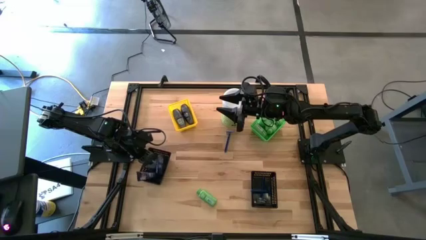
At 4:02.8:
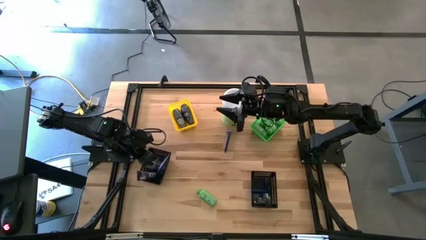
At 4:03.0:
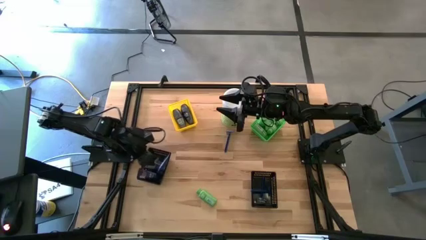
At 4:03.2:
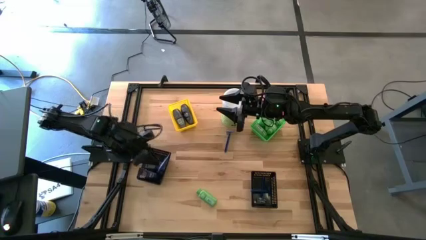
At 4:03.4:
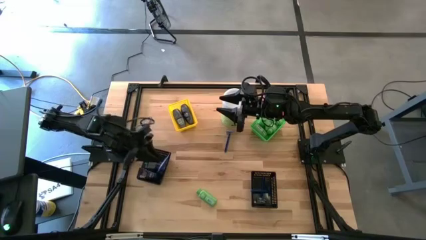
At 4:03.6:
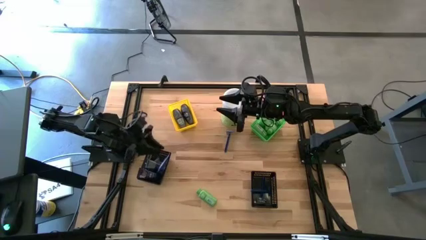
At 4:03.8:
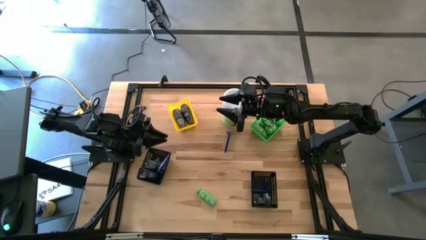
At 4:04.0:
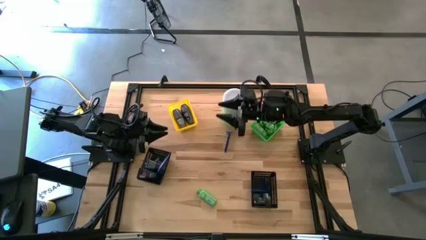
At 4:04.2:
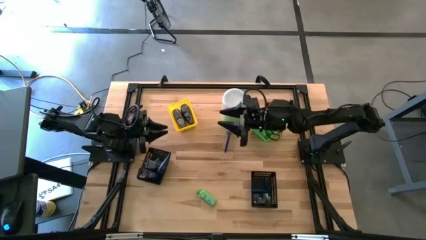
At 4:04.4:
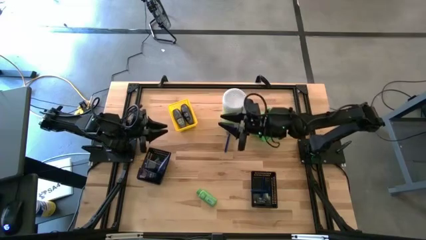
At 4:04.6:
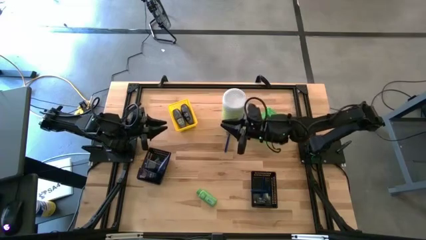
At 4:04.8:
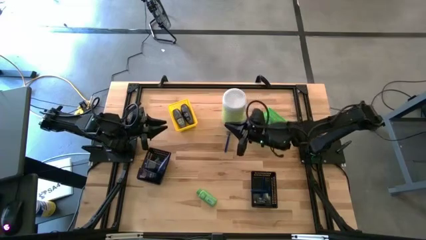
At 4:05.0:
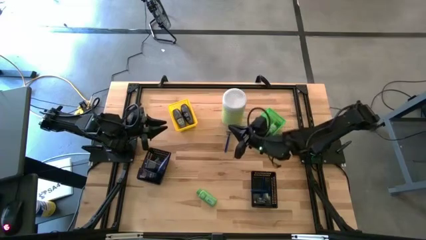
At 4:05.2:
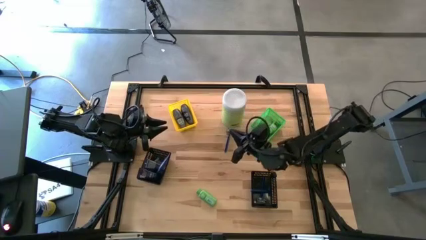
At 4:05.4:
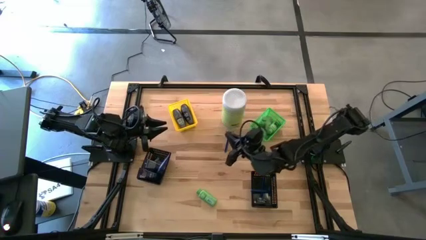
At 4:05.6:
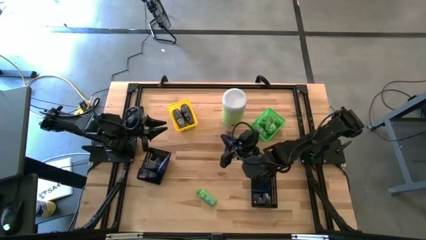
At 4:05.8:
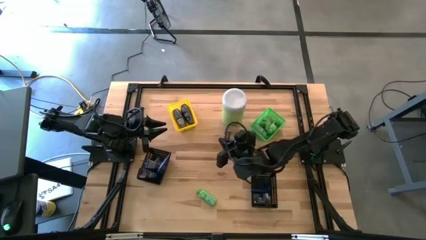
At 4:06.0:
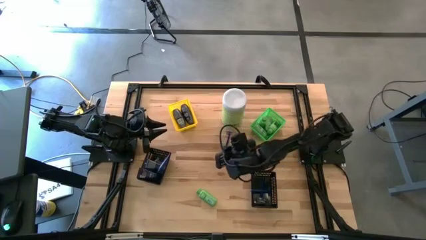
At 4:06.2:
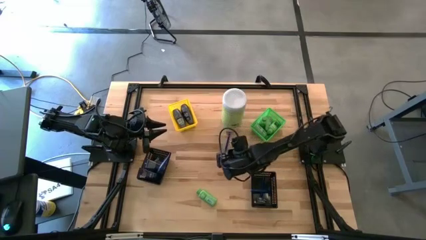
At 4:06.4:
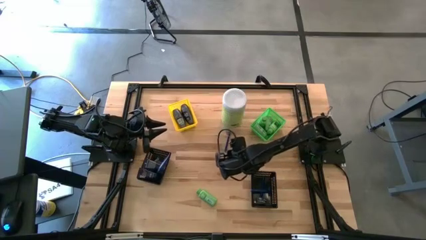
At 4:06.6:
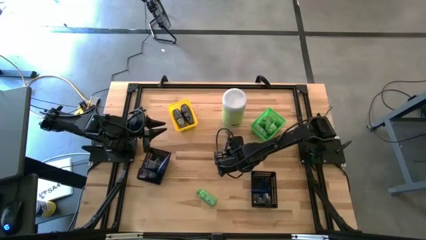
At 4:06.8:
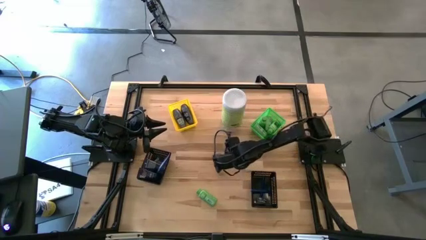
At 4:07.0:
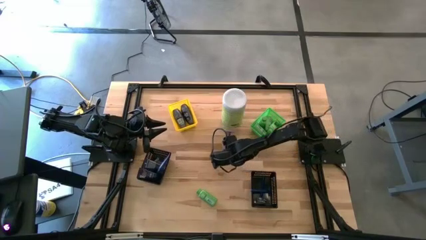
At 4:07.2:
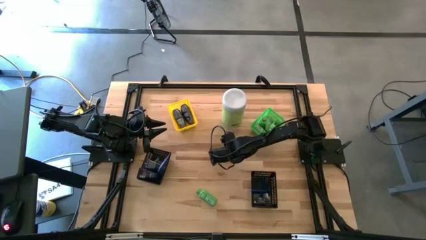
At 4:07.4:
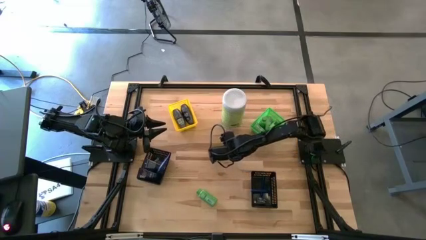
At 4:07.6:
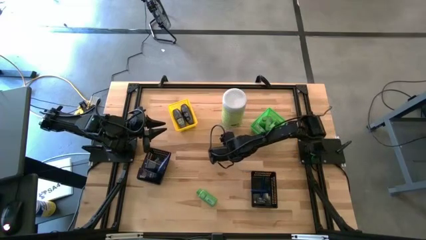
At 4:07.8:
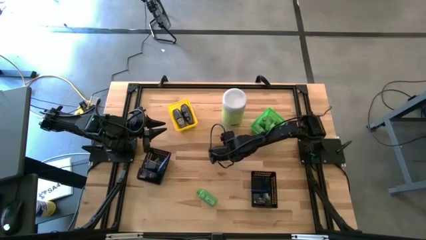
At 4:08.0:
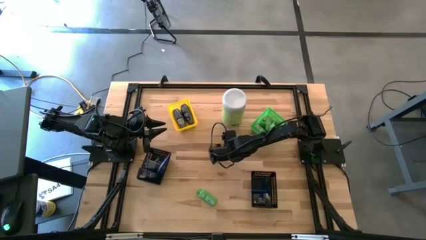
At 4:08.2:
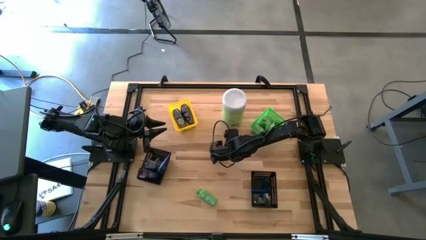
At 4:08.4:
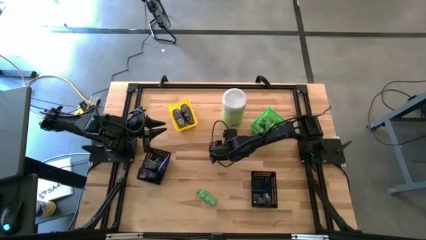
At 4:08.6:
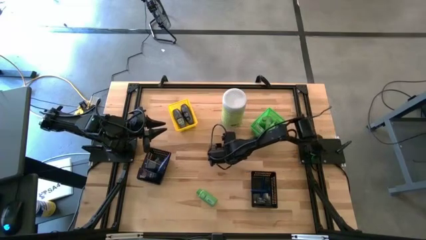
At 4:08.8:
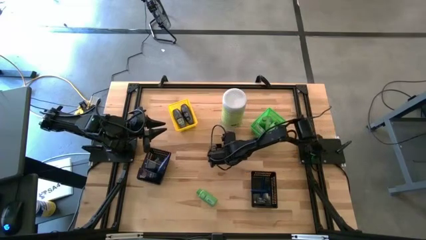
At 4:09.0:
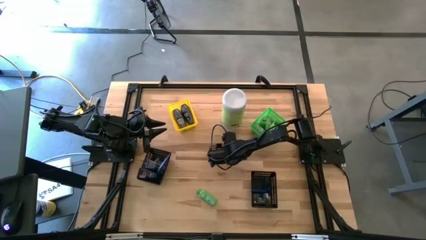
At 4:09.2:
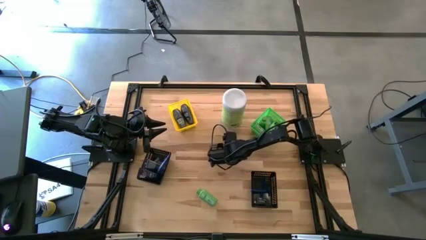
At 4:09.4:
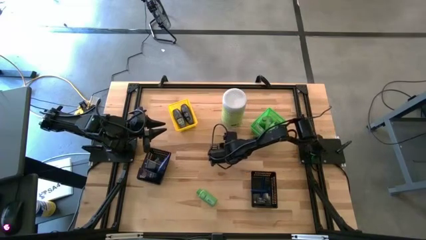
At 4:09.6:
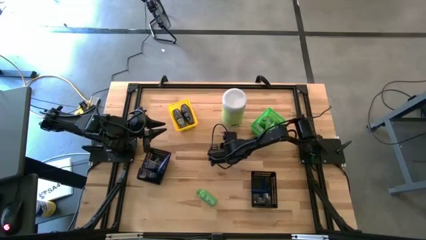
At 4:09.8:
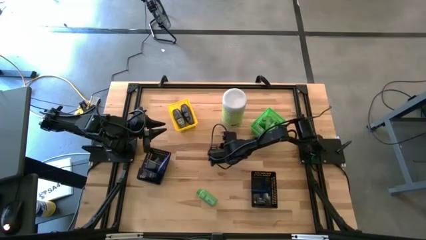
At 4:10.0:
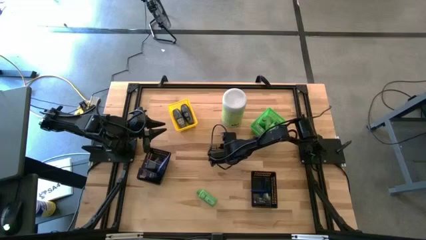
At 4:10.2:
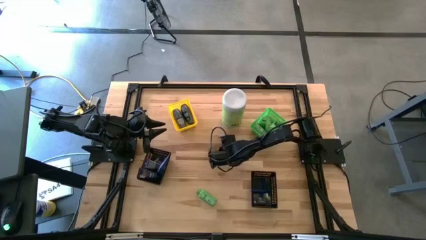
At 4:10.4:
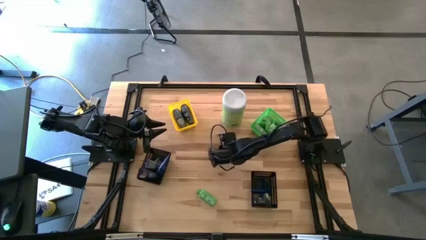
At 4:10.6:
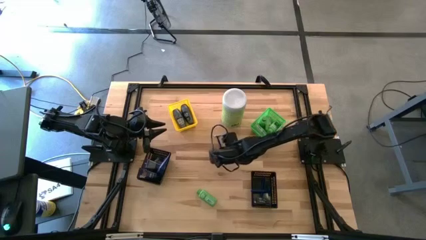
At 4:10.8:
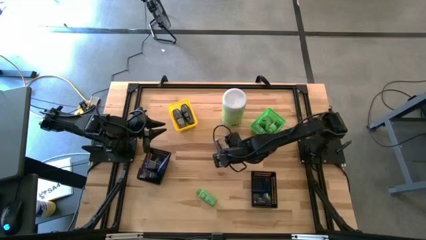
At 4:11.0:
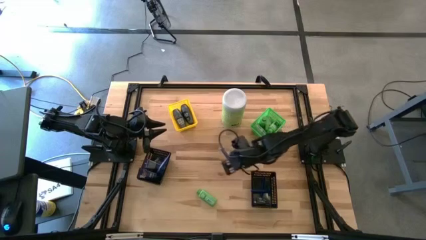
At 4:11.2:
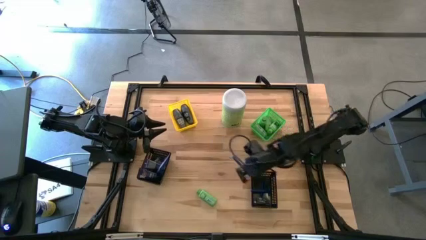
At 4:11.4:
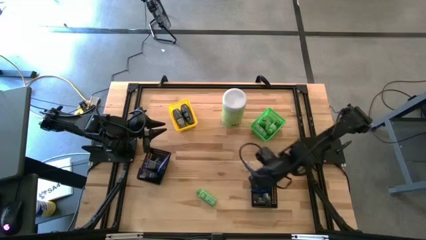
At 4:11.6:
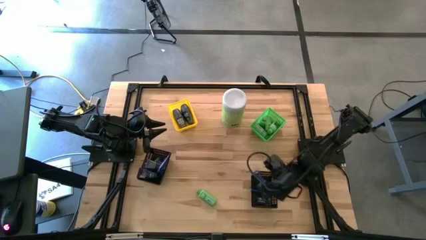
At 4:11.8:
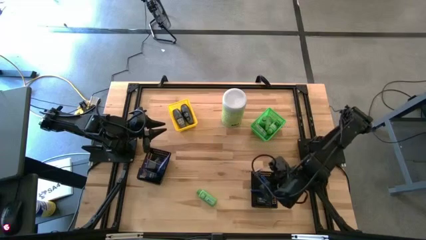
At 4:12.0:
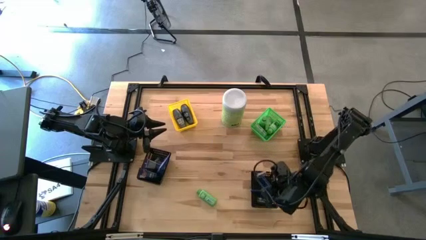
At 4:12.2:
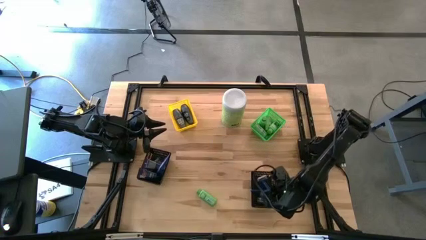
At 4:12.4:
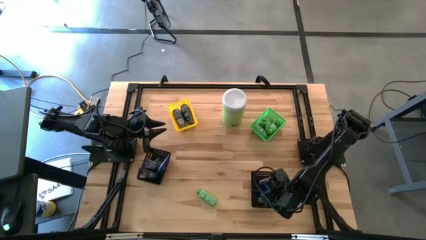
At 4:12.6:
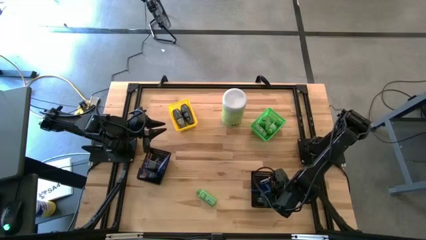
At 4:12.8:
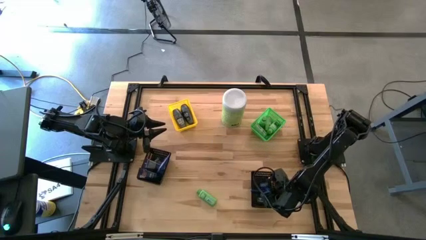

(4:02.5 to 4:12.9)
Task: Pick & Place Travel size toiletries
Put the blue razor into the right black bin

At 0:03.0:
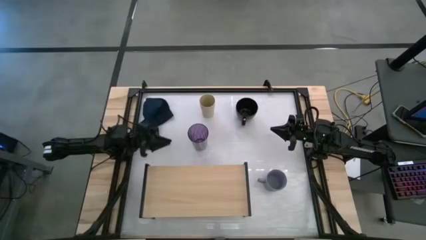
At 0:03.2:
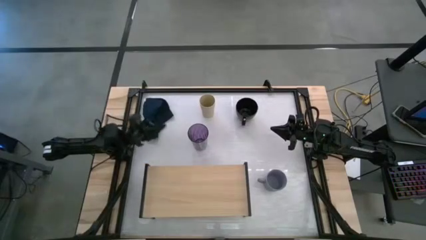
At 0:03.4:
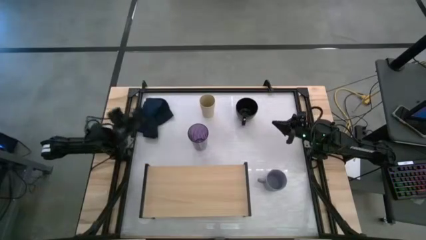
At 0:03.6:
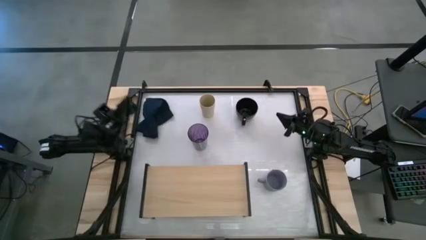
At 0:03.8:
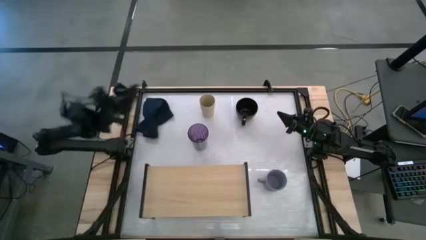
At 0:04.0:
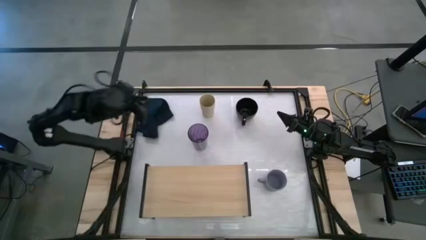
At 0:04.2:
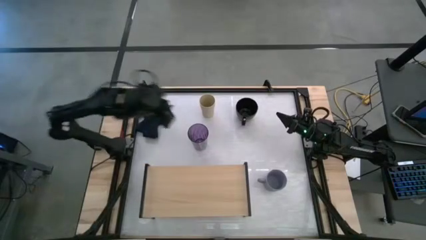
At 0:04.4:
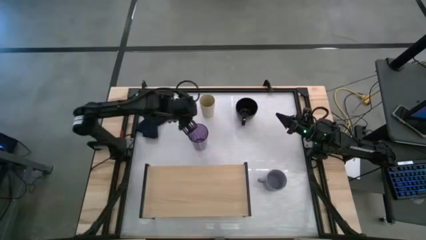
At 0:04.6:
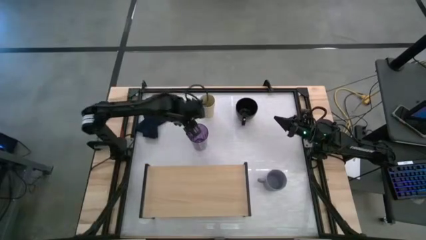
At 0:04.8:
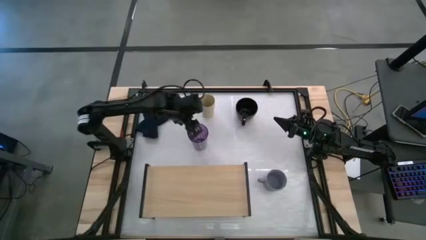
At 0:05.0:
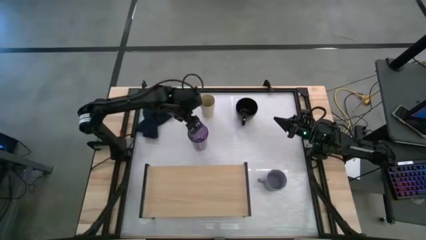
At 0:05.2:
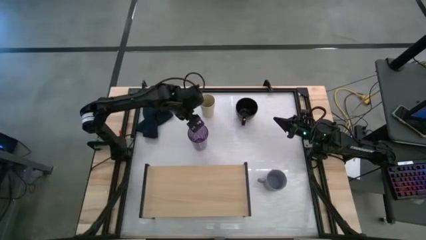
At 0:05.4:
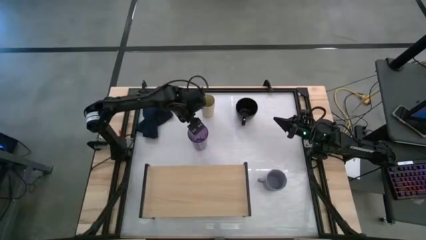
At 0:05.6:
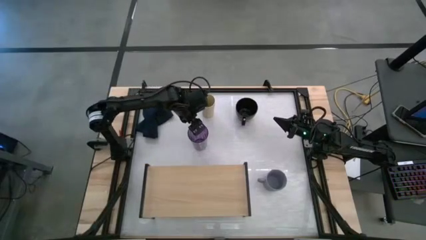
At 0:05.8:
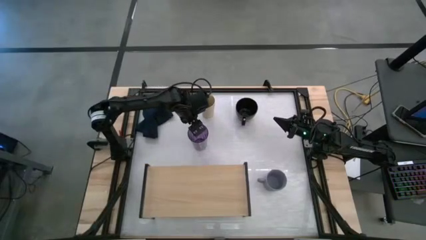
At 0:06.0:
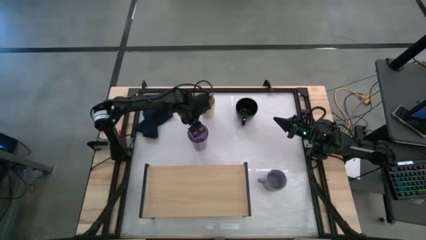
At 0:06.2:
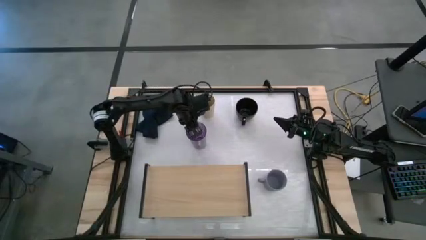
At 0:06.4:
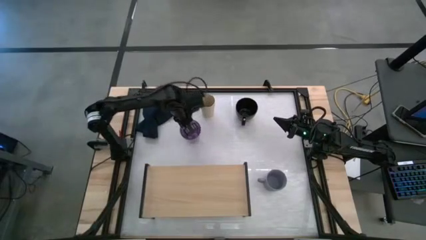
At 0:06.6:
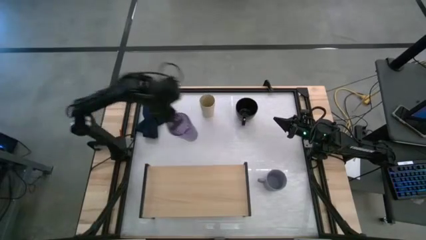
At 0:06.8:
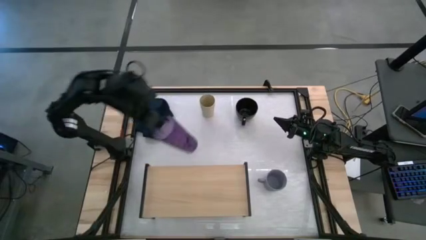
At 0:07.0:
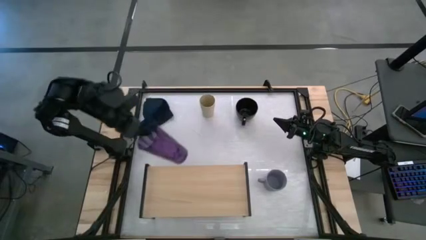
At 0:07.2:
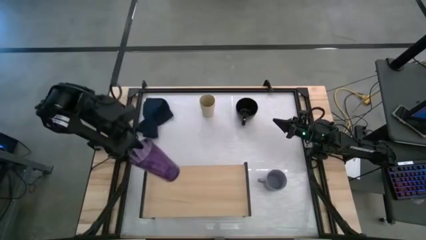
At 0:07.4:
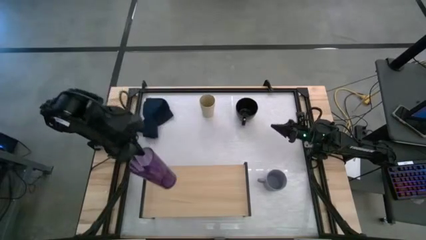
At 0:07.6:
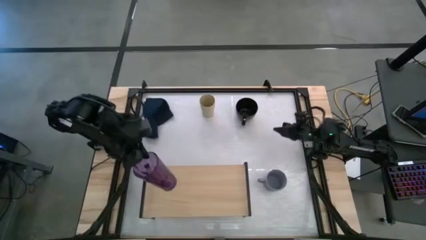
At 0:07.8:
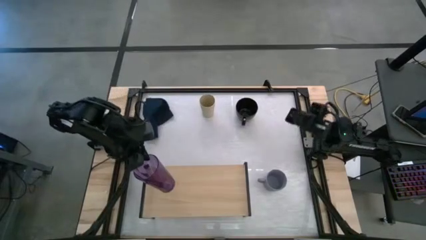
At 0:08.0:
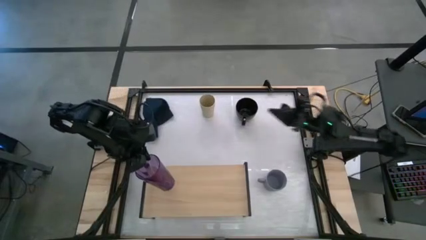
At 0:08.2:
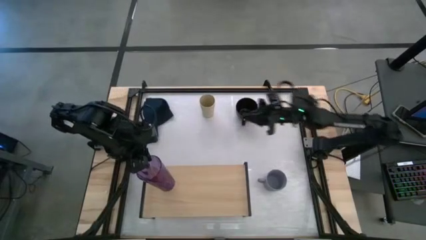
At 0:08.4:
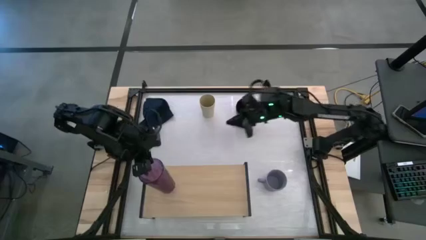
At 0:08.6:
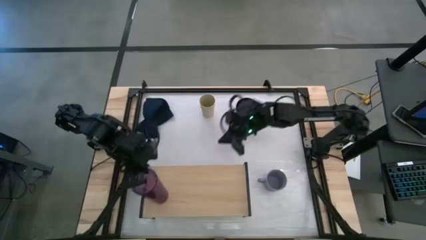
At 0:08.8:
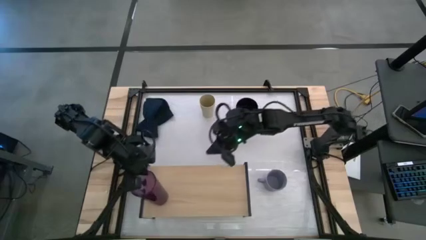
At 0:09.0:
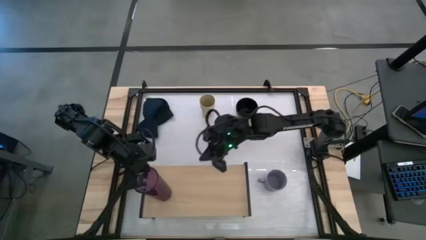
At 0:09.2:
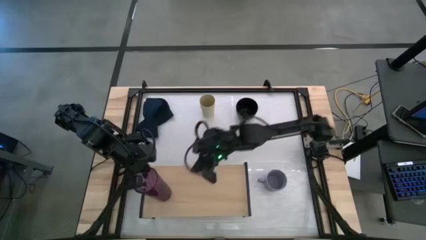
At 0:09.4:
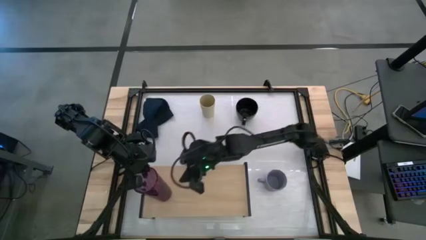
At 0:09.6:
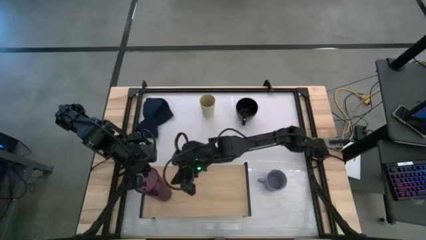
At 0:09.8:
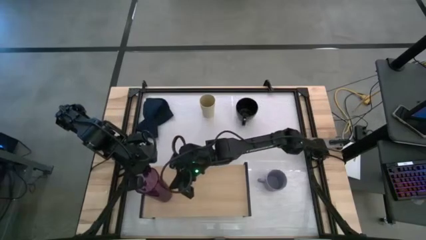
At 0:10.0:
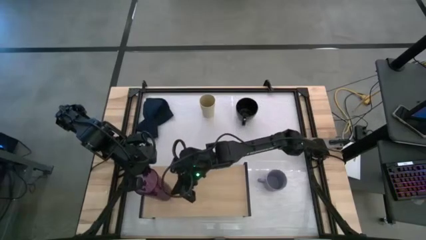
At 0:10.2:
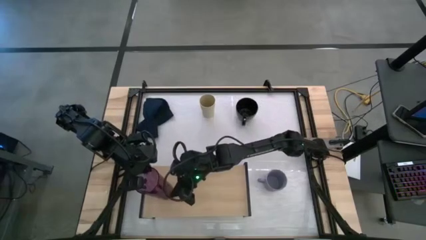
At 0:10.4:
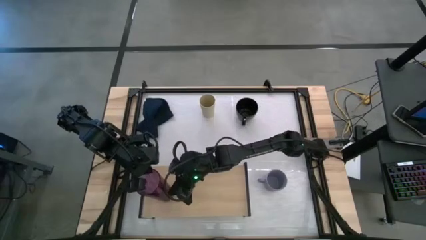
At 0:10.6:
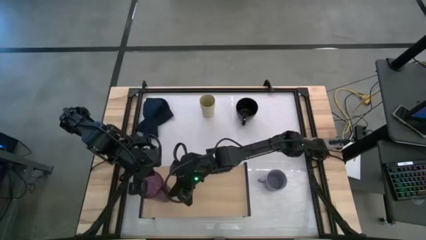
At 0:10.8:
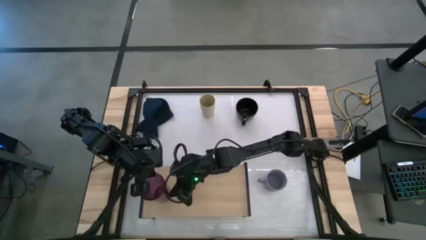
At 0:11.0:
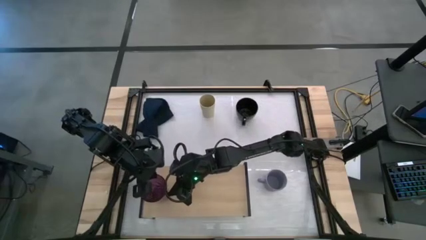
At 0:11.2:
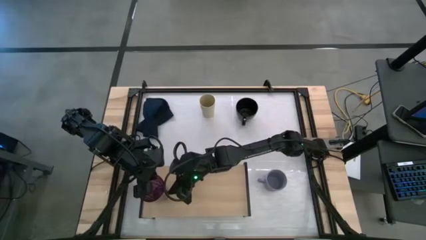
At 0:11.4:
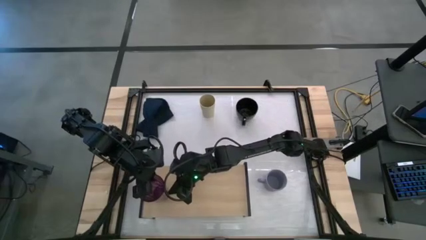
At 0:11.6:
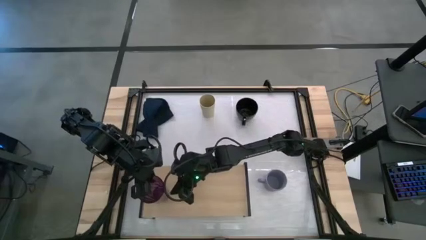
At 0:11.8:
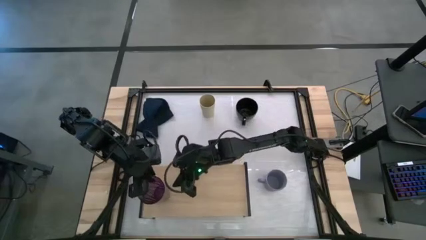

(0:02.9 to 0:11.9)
Task: Stack small to large cups/mugs on shelf
Put the purple cup on the shelf
